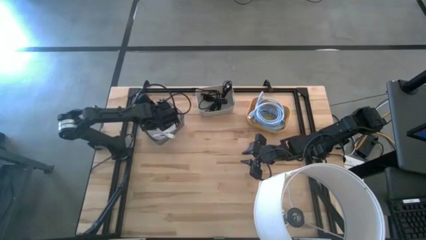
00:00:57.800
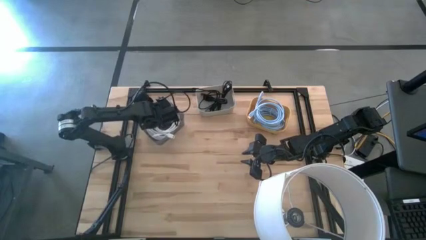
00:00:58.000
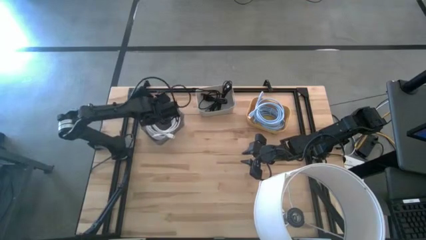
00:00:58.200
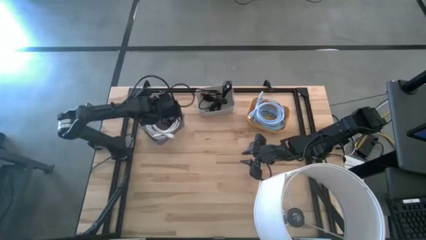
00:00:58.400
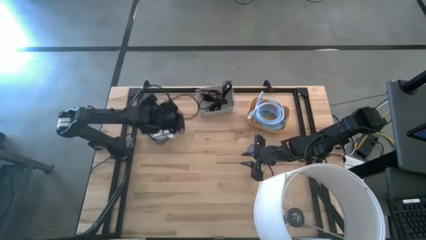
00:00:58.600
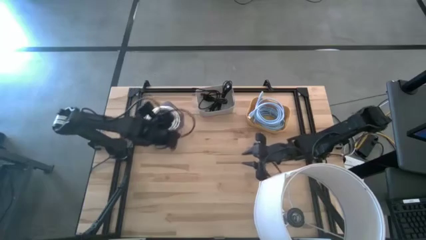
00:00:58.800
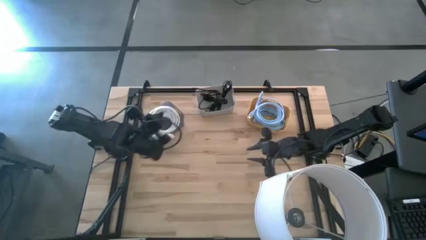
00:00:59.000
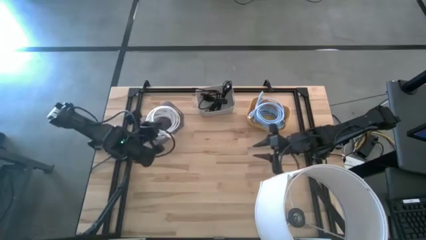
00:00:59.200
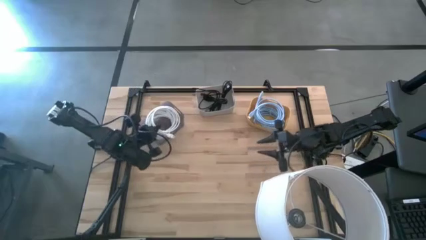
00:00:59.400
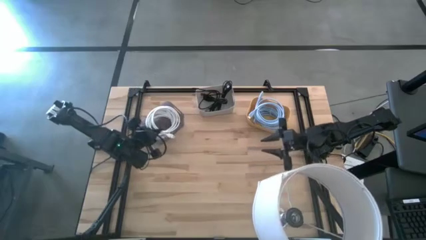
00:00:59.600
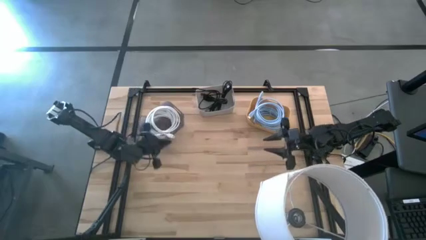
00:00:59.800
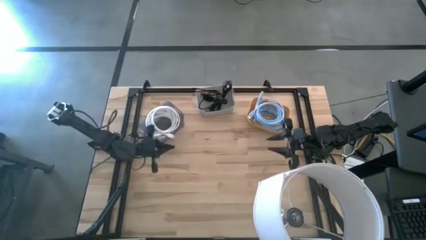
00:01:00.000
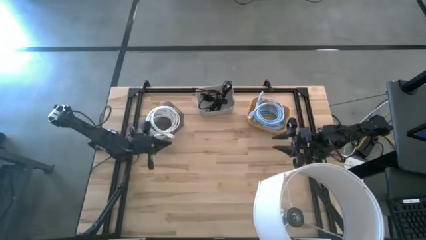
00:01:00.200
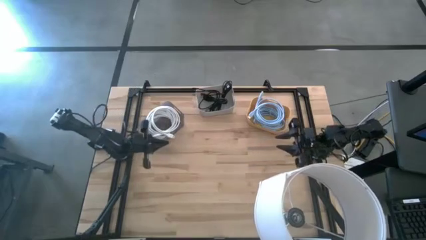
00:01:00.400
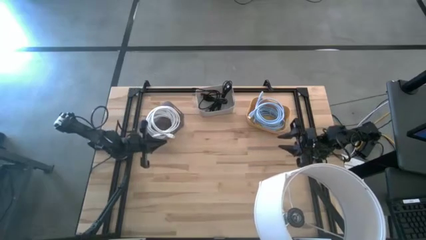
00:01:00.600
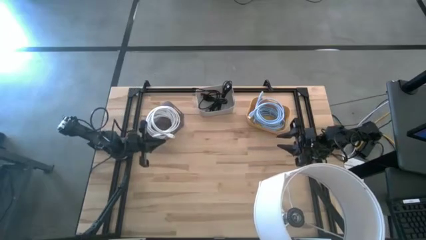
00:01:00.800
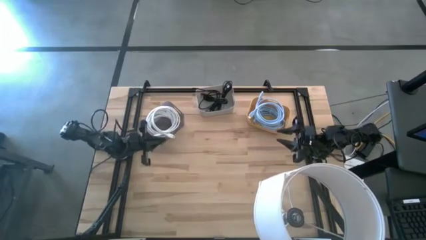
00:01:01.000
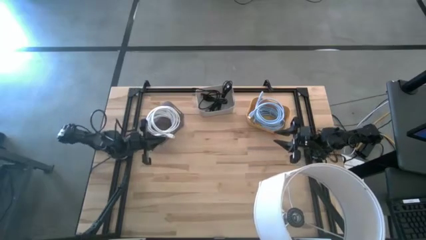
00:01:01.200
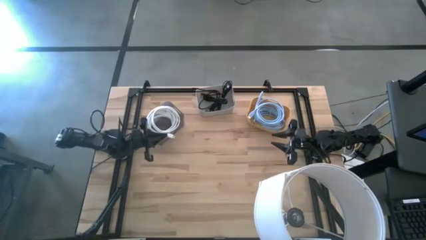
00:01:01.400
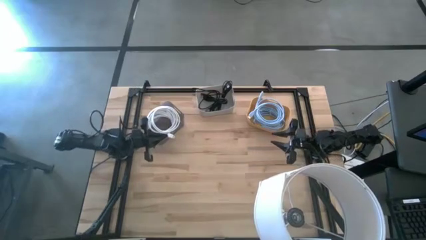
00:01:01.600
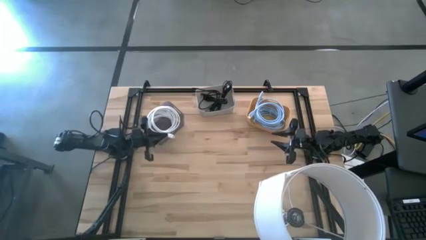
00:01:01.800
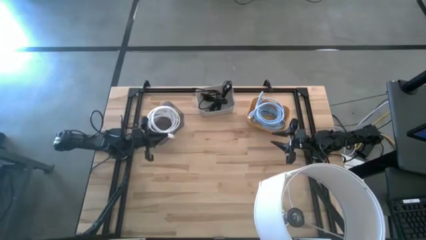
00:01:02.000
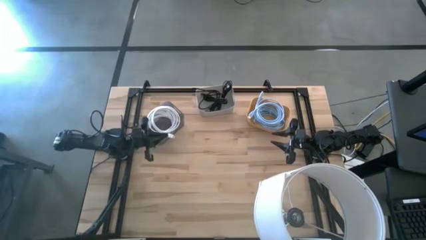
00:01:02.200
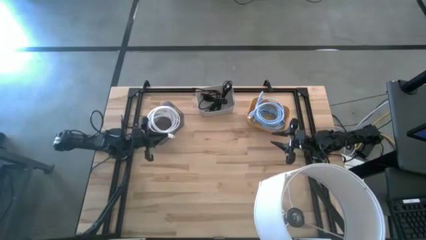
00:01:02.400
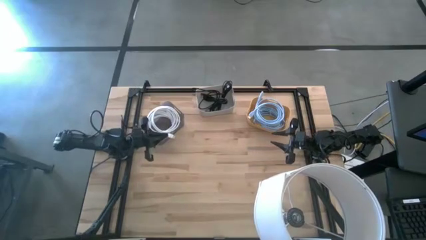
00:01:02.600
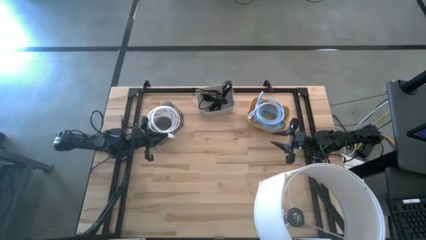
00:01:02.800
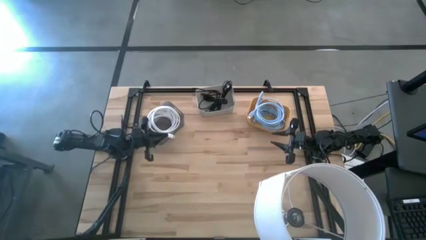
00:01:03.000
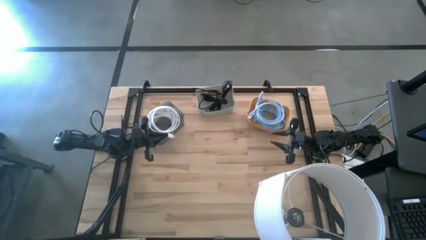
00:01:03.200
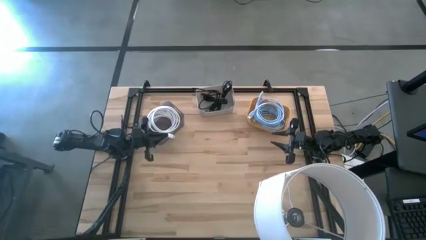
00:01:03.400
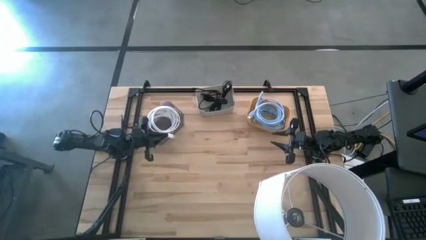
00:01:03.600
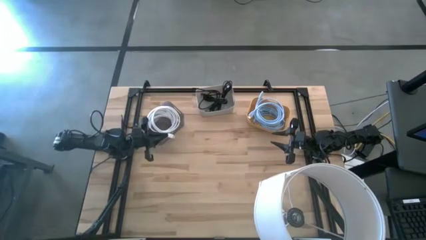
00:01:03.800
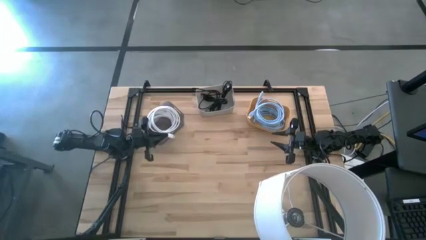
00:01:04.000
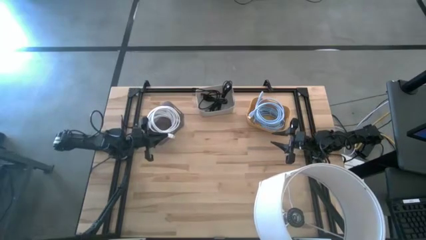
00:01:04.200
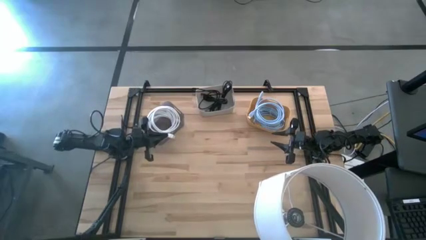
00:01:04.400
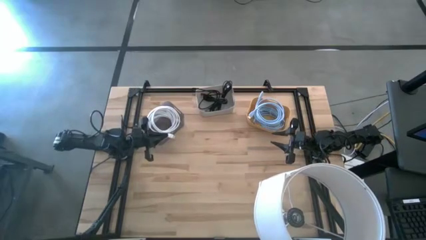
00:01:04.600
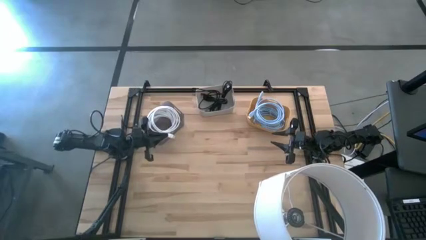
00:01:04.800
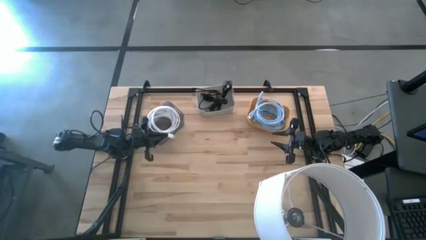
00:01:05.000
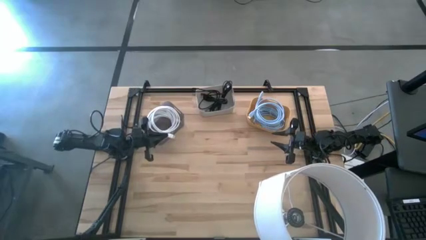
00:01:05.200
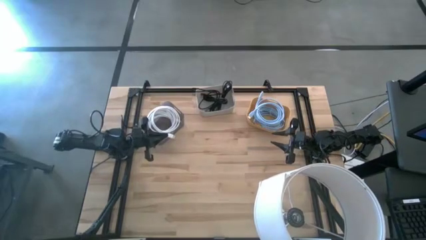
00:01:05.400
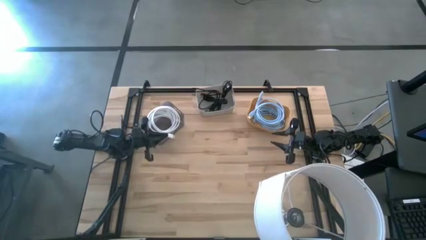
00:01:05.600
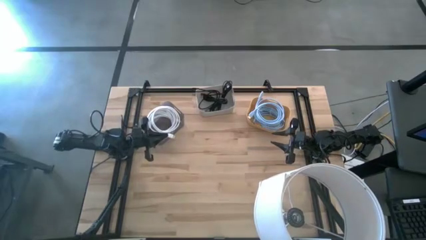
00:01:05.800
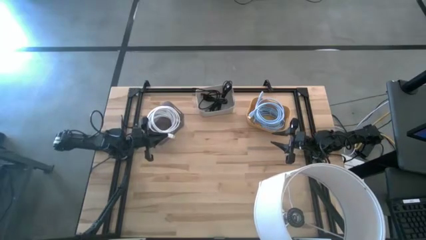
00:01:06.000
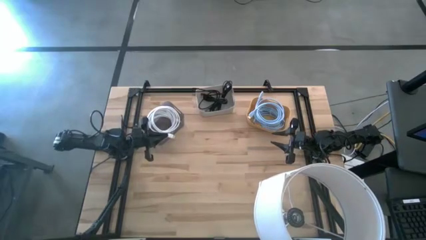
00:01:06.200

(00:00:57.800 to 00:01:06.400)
Task: Pick & Place USB Port
Return to Home Position

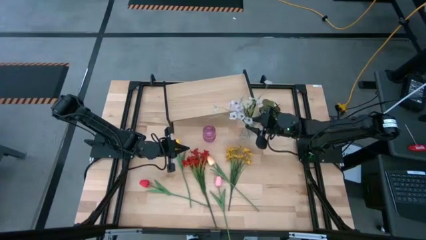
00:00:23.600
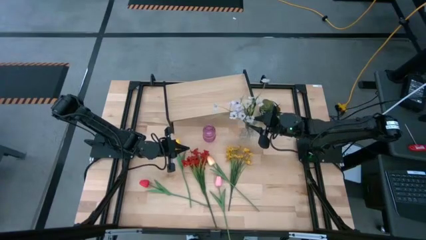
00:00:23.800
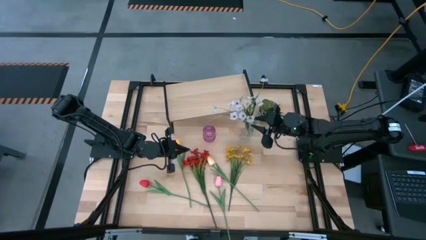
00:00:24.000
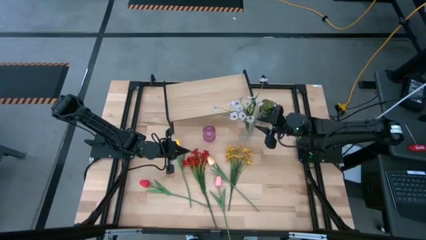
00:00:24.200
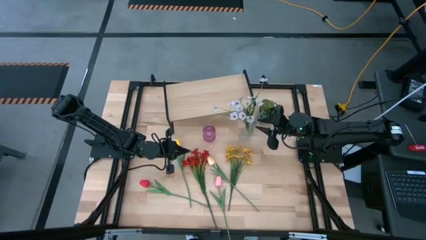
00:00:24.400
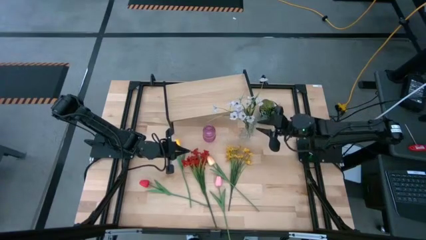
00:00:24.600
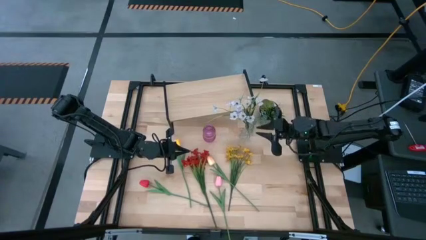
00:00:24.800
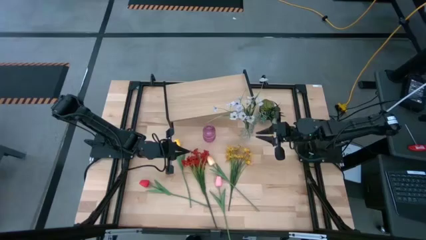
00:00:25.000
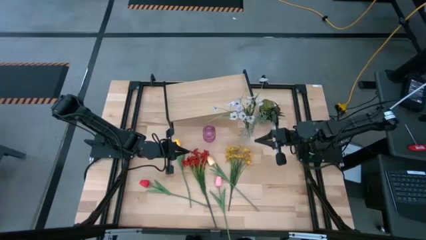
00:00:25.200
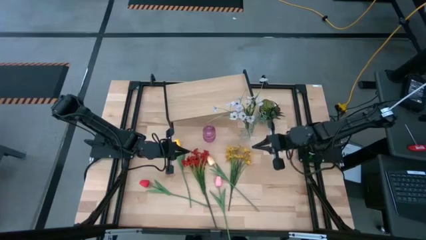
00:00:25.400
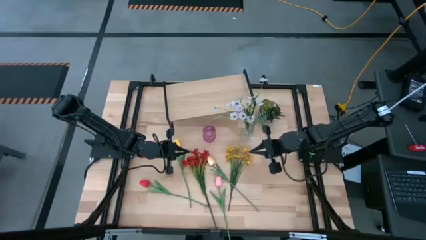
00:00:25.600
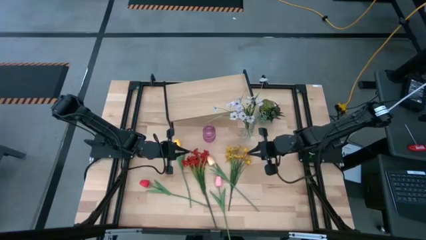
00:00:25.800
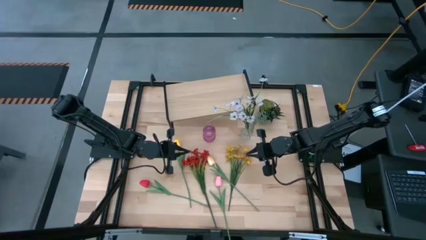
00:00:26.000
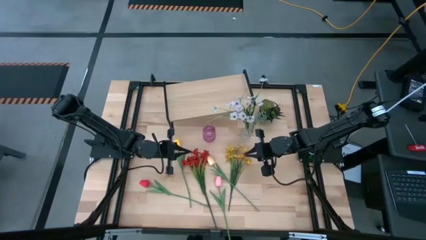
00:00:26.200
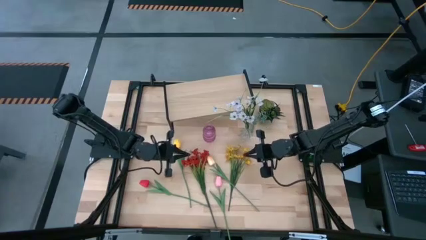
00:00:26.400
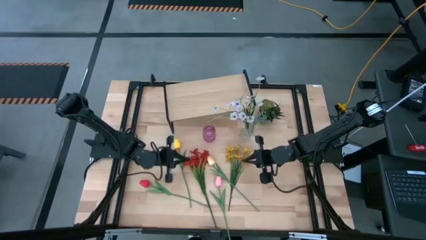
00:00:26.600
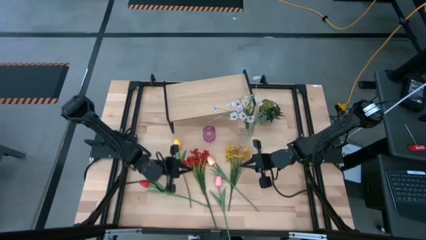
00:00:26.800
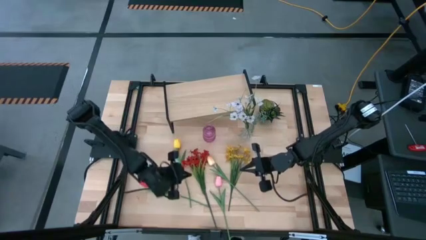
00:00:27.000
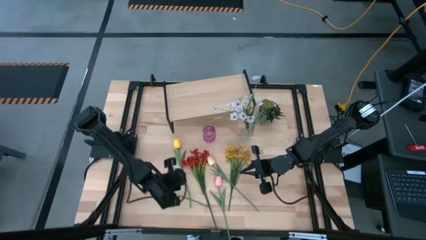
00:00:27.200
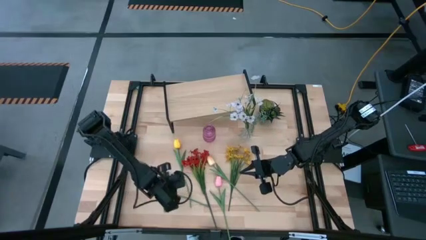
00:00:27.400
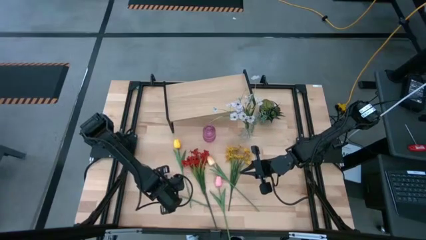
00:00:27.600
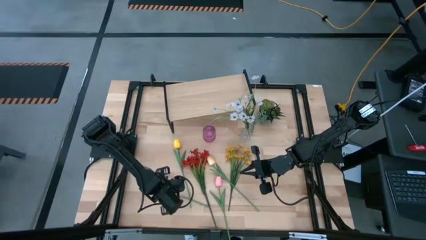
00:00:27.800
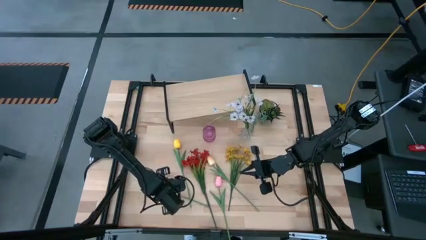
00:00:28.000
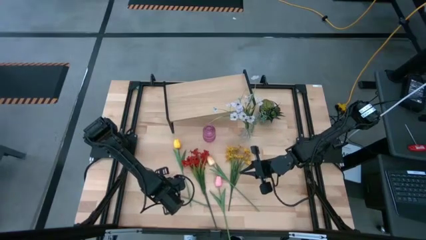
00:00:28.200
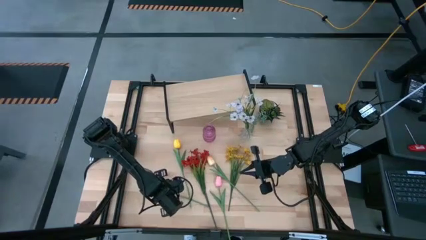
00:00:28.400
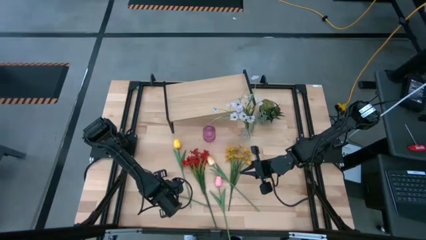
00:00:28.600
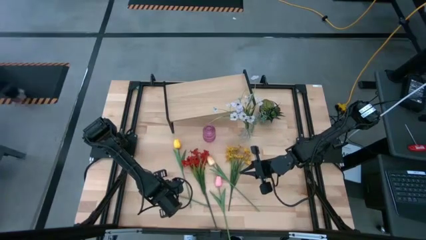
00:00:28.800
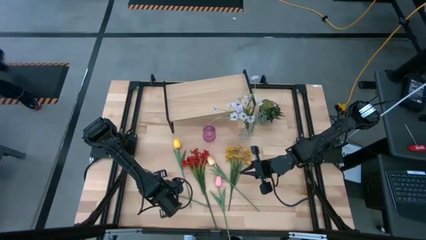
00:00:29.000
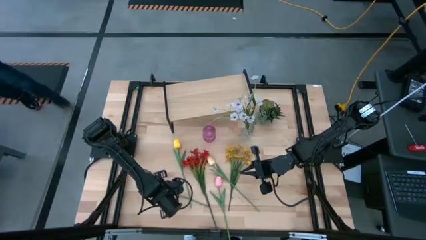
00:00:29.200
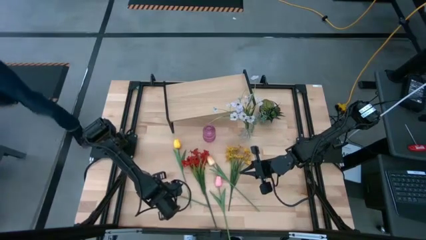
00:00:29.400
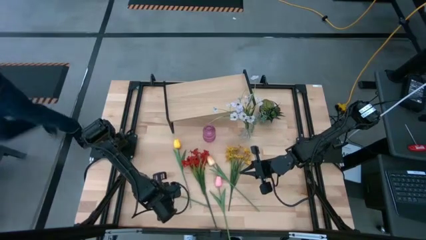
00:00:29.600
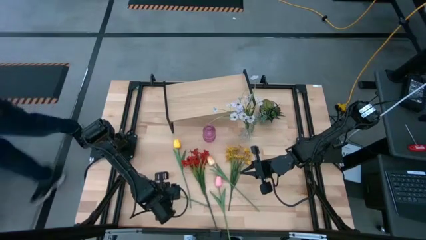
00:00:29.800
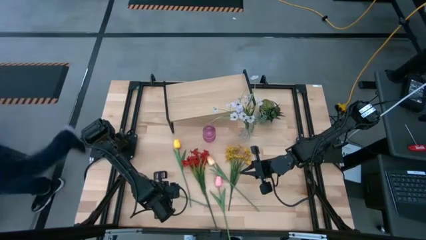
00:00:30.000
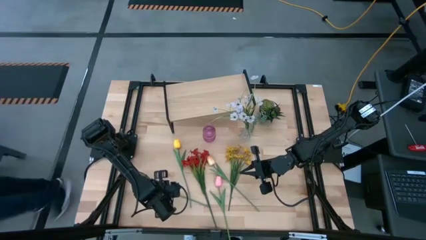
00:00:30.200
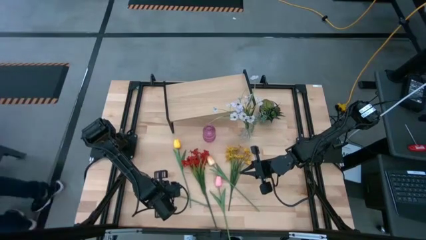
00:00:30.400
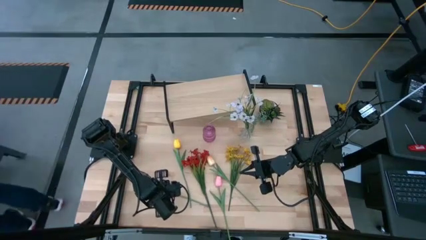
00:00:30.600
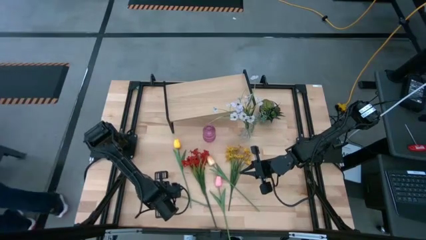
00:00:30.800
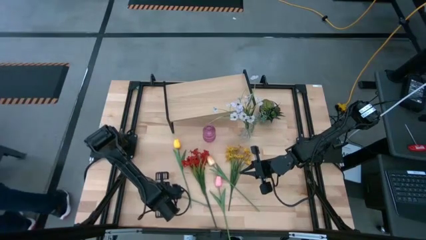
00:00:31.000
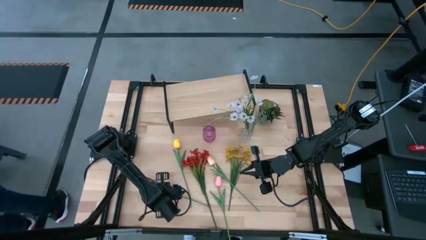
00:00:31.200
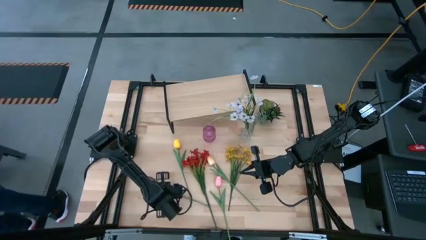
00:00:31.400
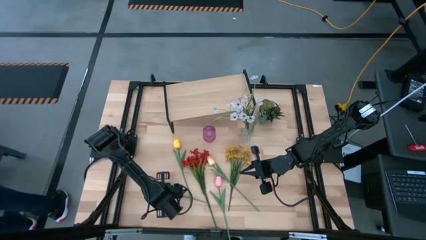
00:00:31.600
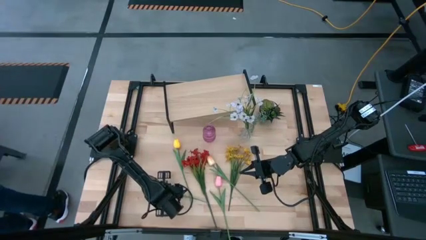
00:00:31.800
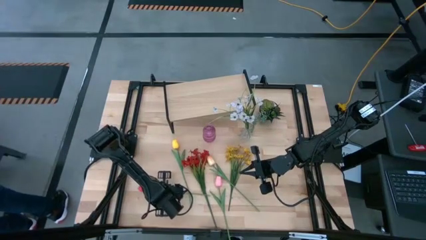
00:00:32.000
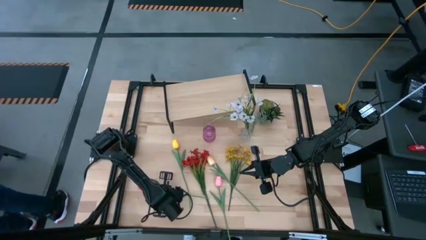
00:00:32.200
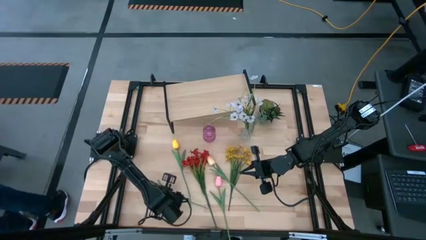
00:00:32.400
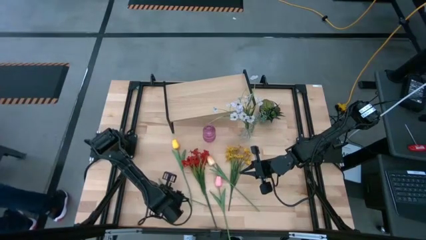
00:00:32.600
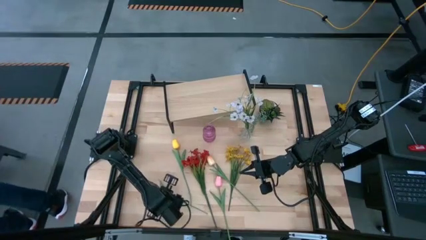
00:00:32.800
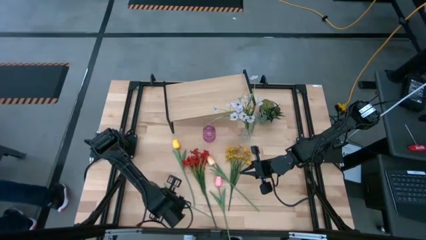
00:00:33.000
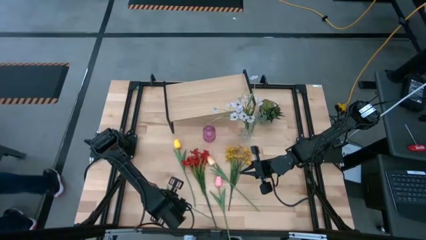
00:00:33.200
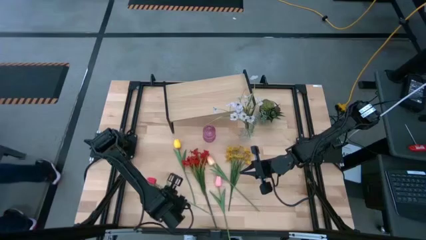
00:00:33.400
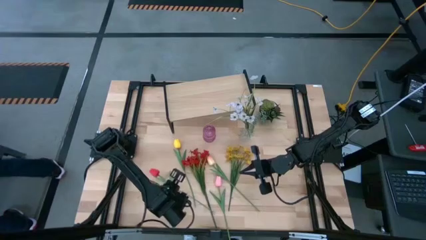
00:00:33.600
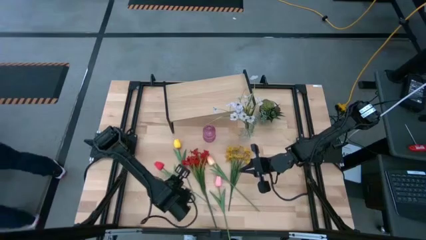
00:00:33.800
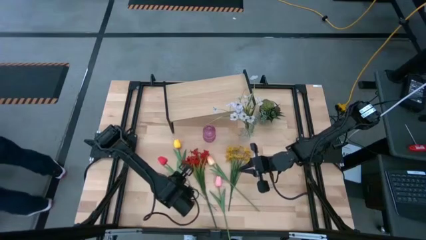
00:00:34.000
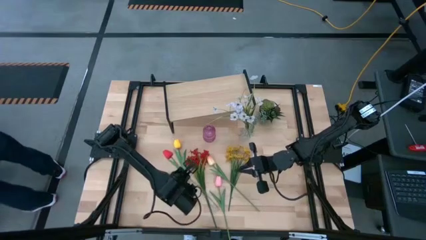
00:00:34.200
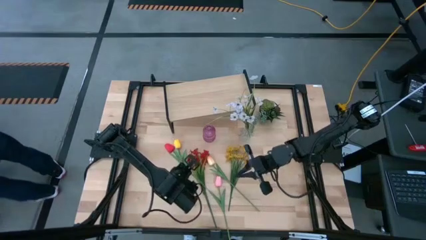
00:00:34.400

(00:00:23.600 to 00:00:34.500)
Task: Pick and place flowers into a vace then onto a shelf
Put the red flower into the transparent vase
